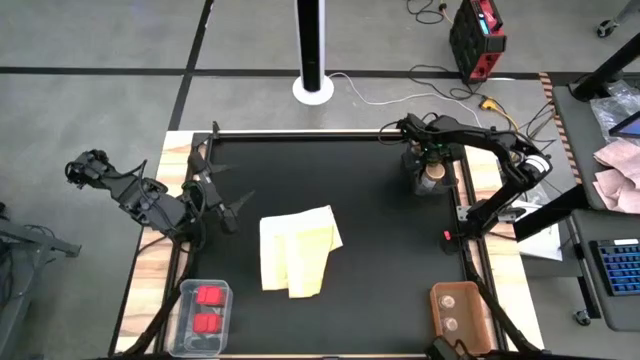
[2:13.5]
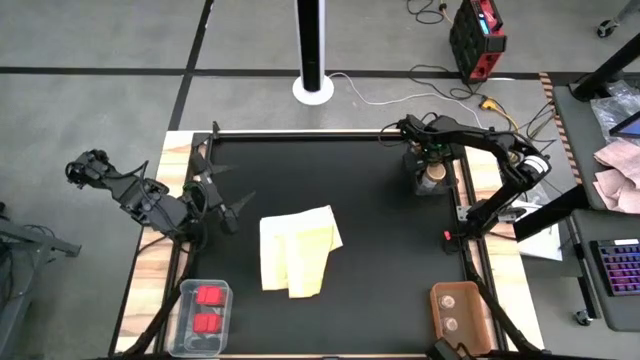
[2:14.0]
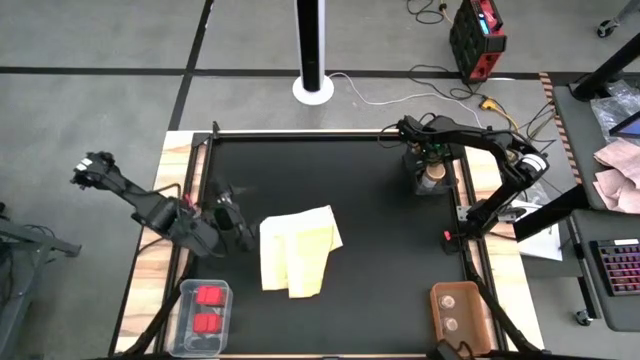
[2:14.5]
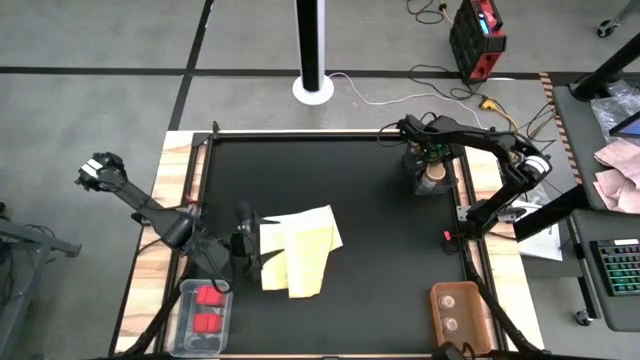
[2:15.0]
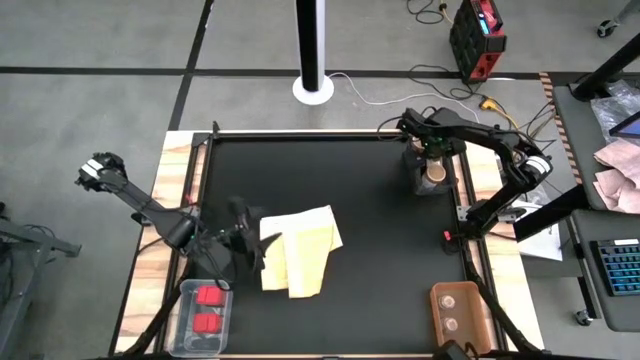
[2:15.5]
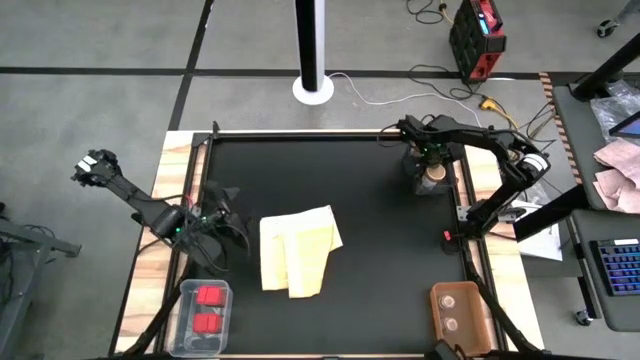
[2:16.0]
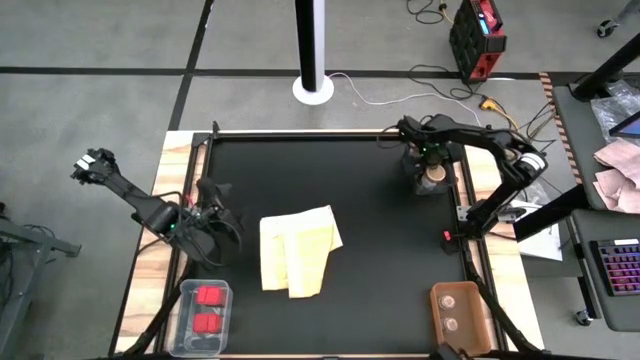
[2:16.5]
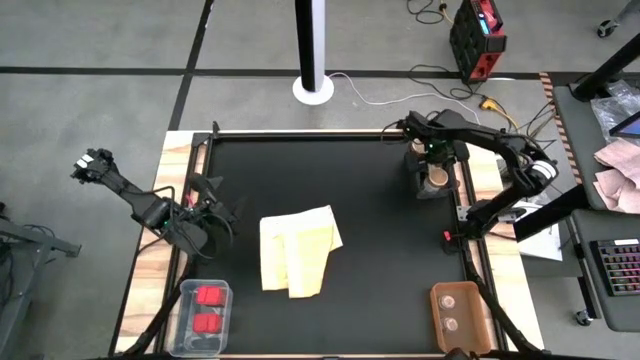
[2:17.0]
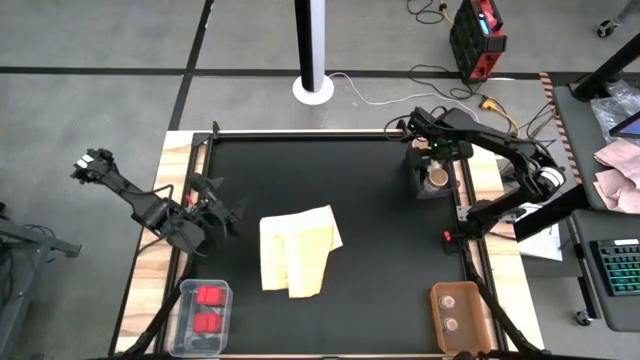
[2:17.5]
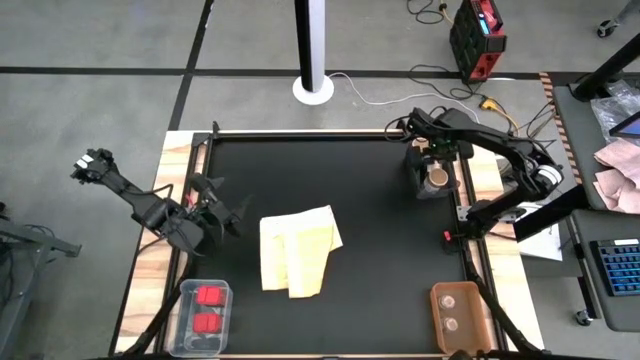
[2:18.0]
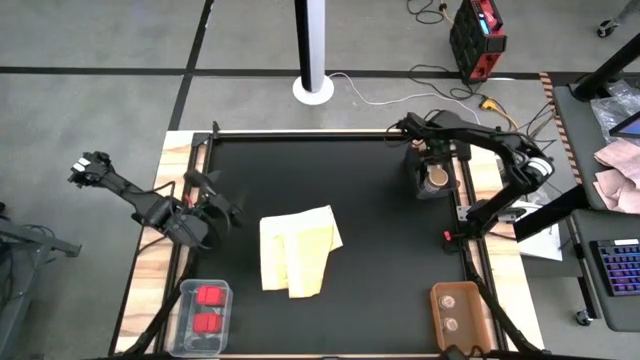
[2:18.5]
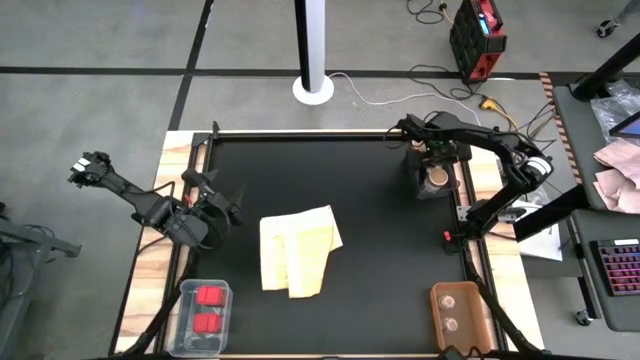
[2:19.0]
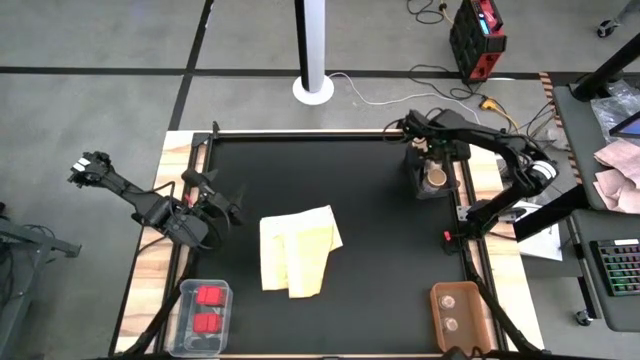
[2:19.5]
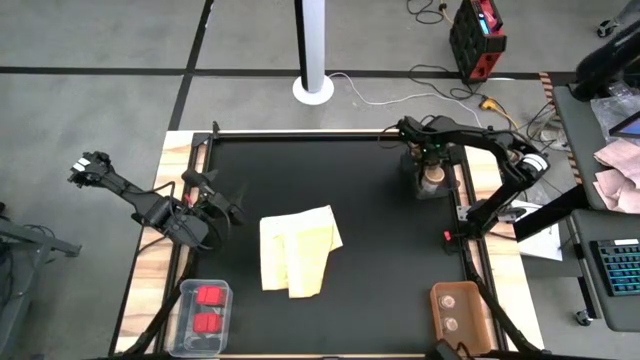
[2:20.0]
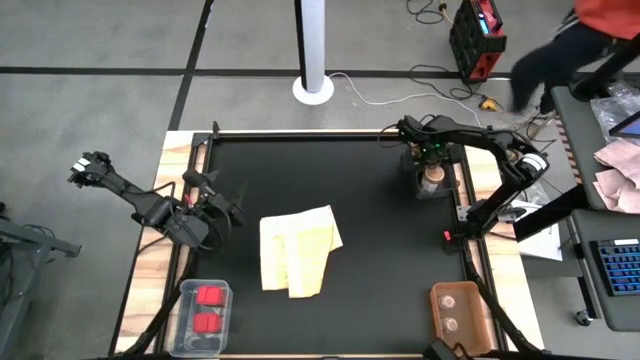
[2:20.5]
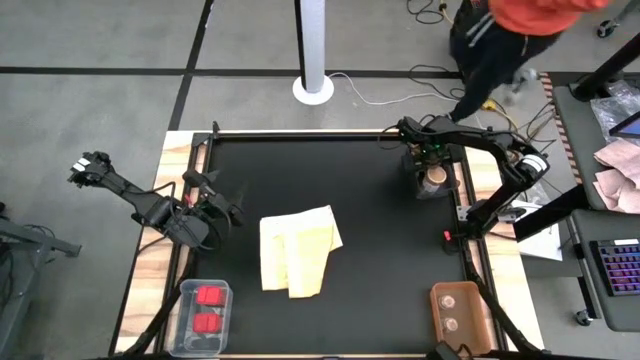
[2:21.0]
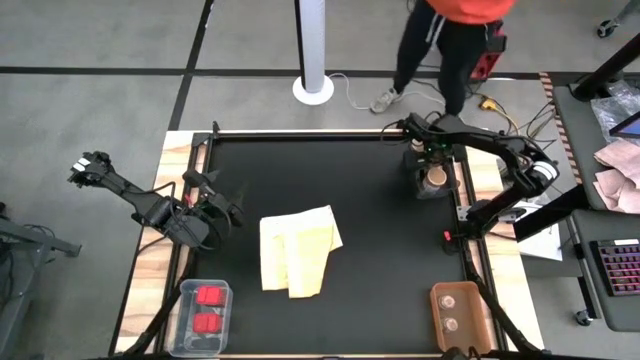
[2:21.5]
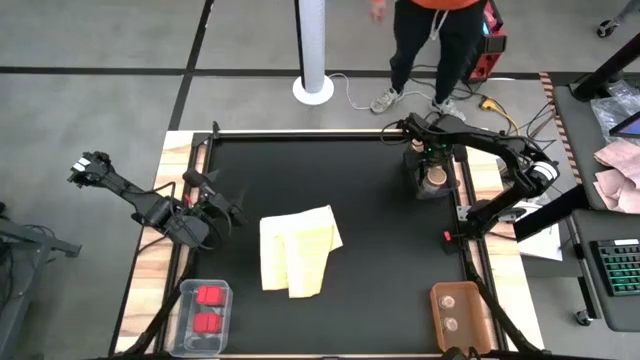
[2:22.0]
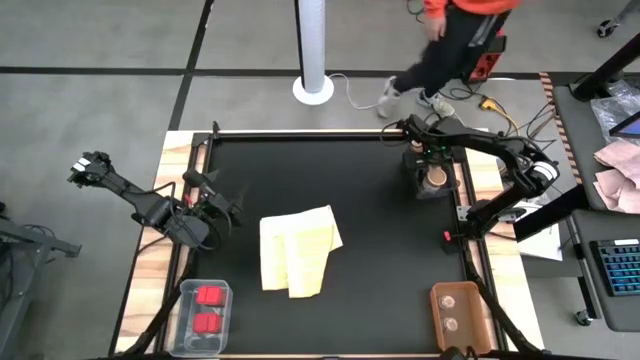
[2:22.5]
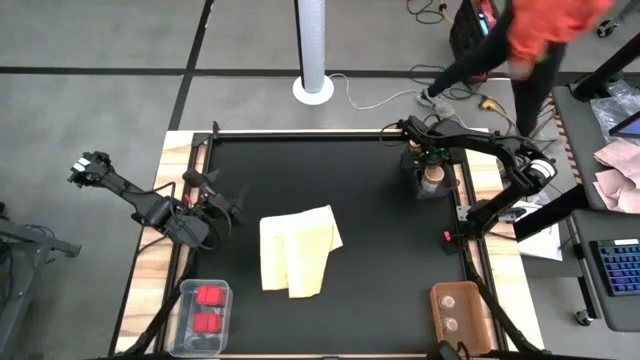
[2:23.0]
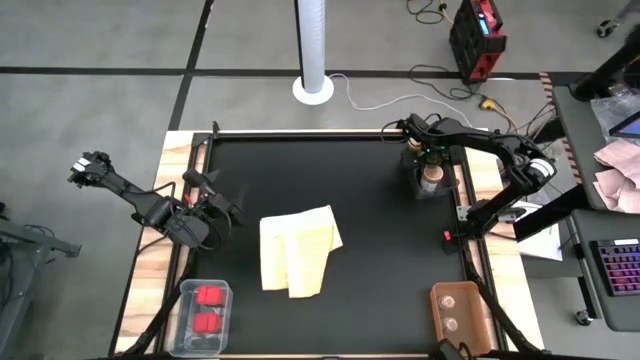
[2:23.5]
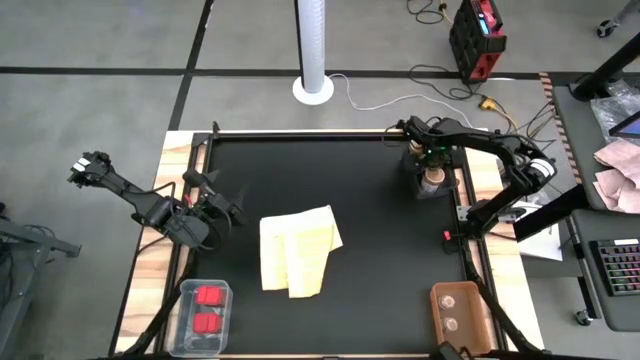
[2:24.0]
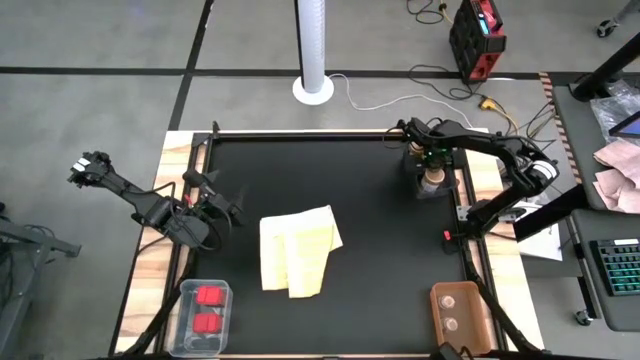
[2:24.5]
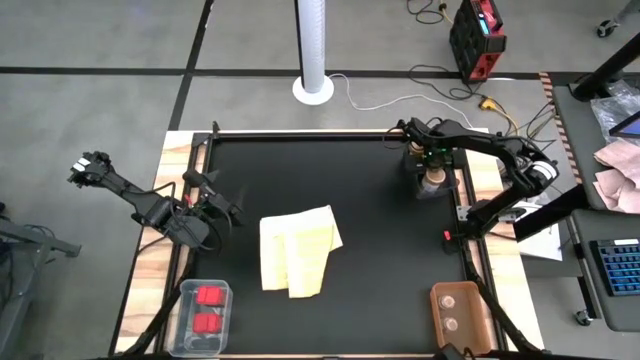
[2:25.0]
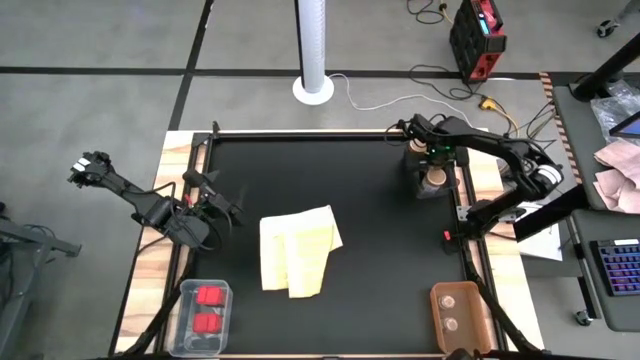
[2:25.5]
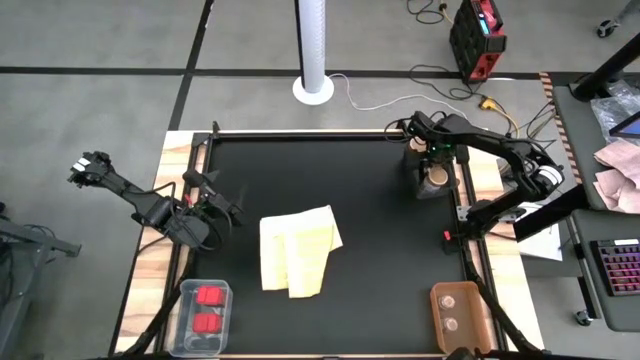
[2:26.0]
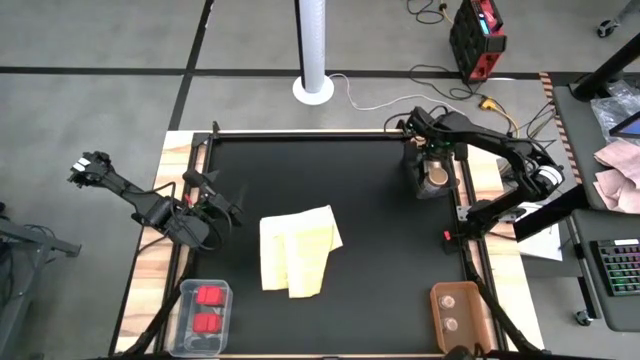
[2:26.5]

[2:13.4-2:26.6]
Task: Sort spices by type
Adjust the golden spice bottles in the black bin

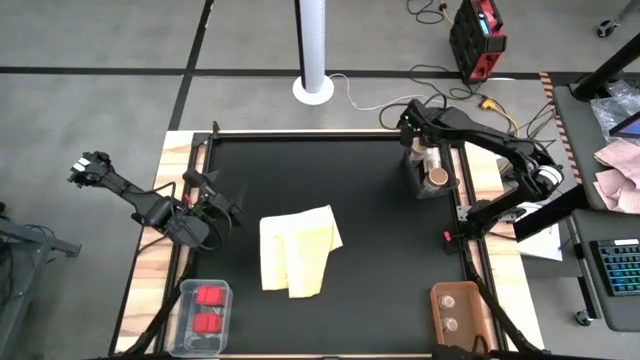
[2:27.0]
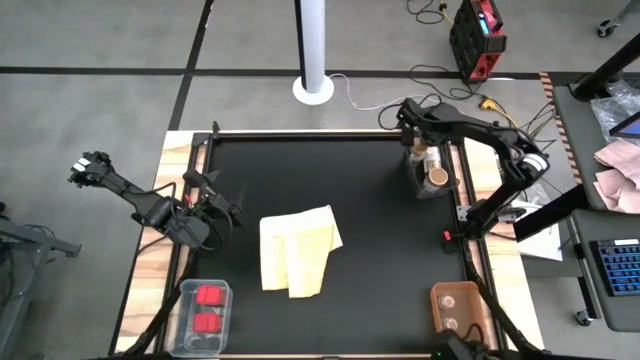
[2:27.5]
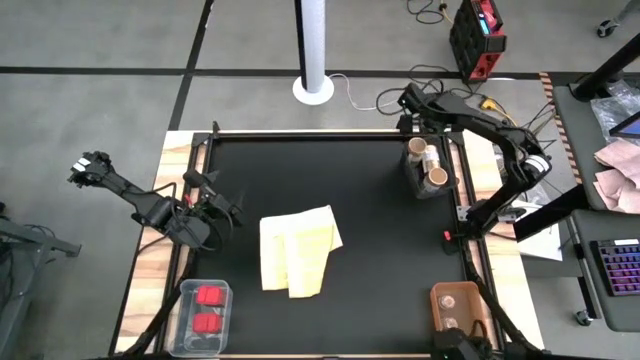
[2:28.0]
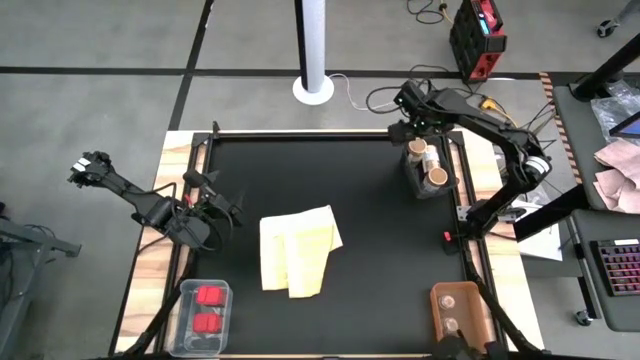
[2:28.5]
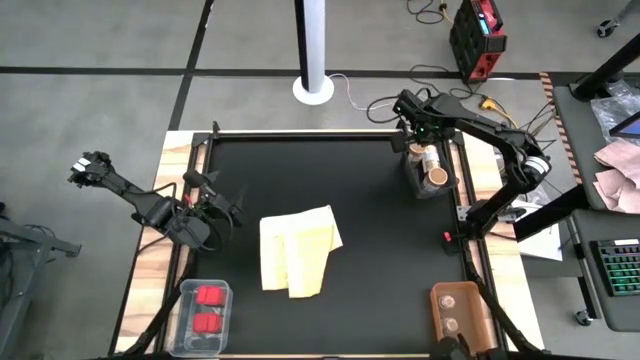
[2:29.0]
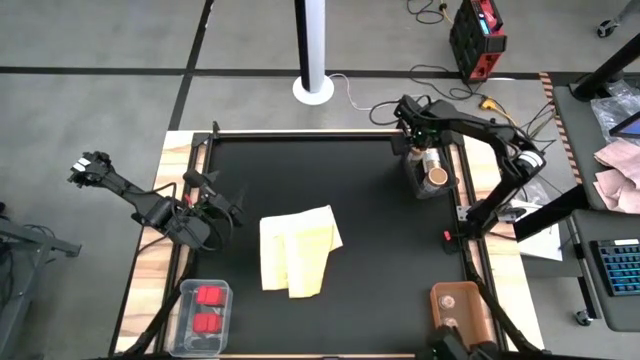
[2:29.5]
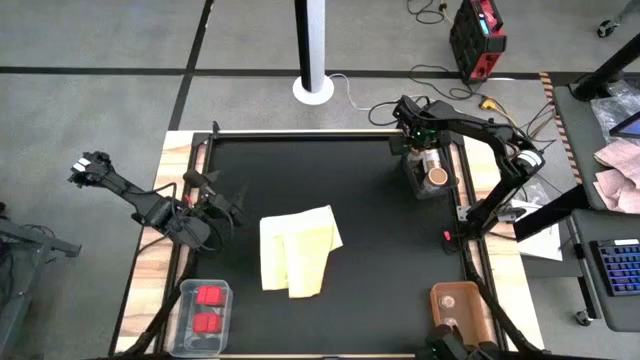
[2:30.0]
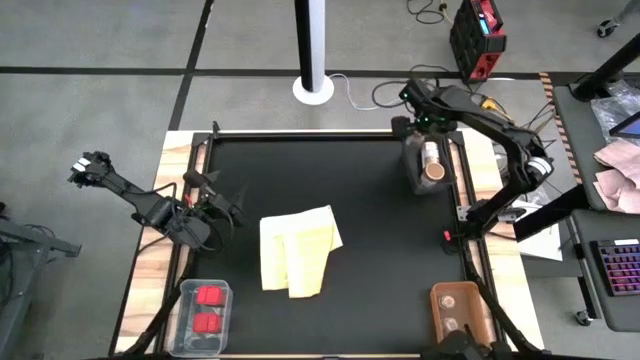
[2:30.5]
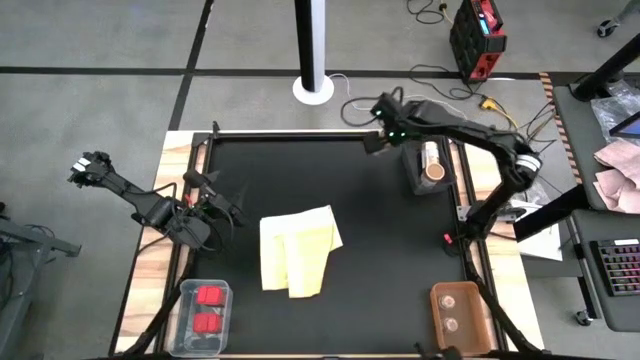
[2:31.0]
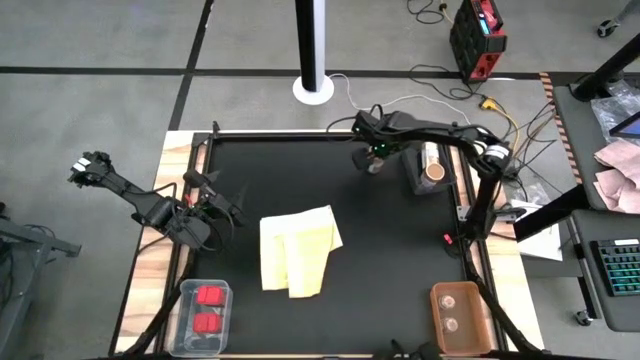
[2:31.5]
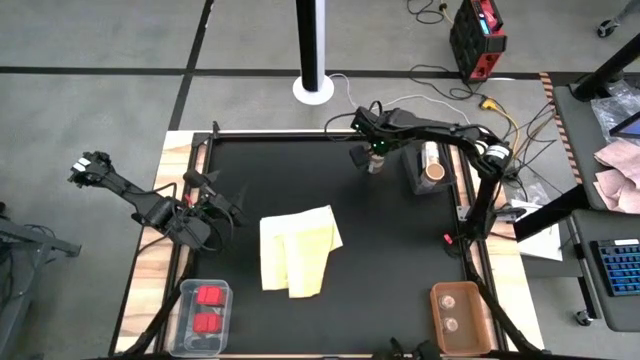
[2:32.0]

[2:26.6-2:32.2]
Remove the top left golden spice bottle from the black bin

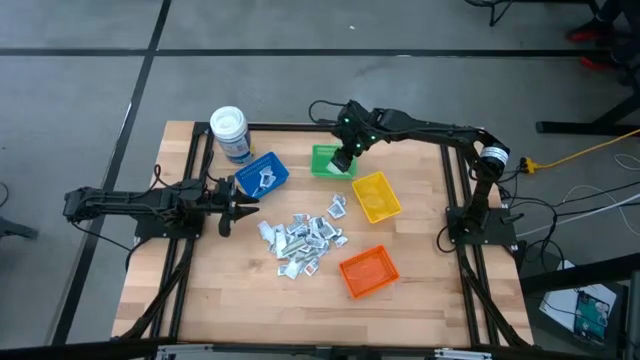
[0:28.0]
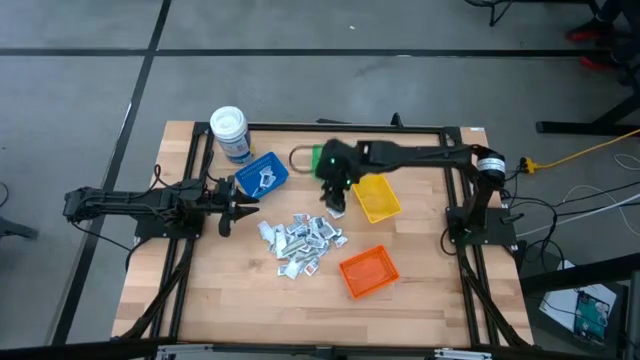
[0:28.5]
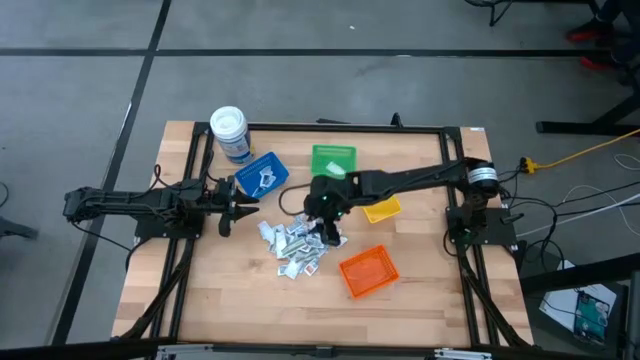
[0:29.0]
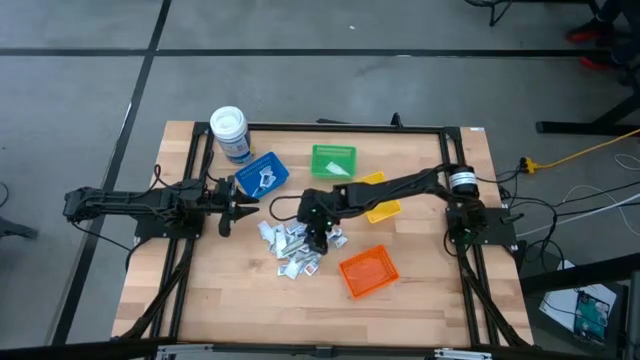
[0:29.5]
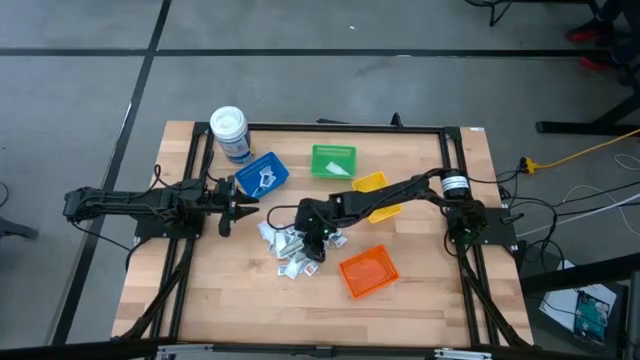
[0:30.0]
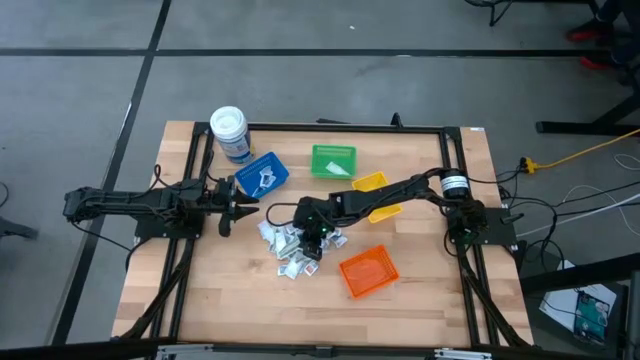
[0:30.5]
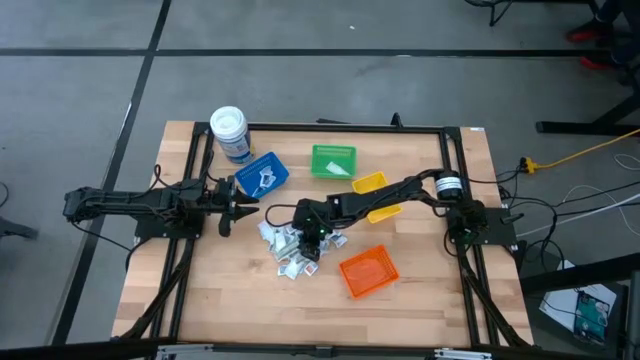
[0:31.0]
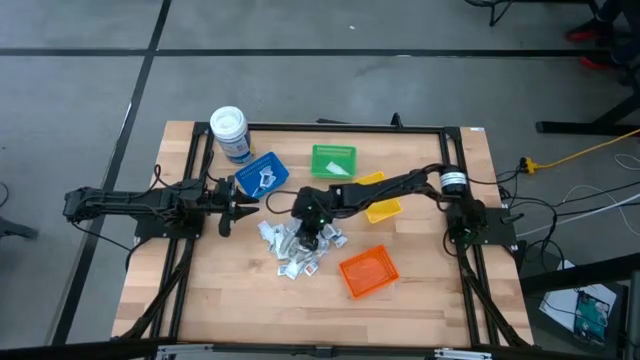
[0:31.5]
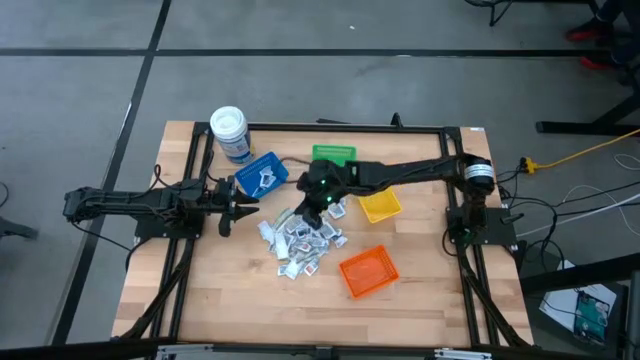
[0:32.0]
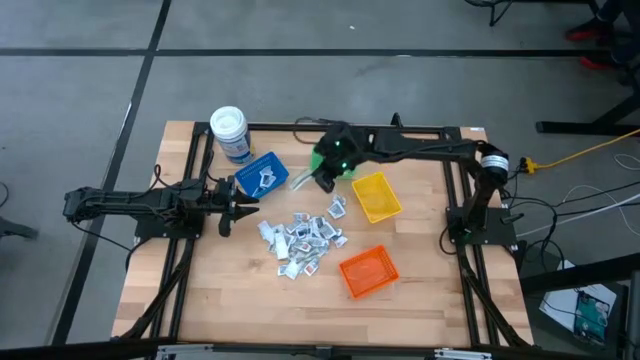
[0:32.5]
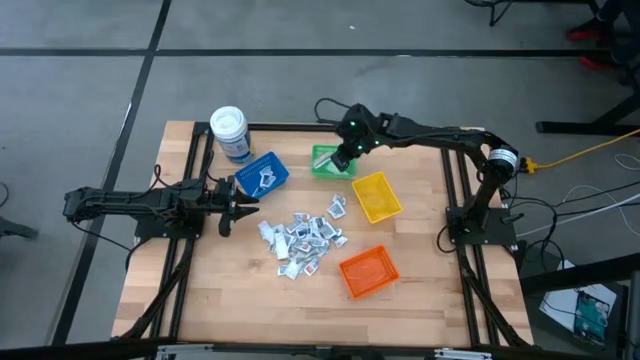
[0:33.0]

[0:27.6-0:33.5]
Task: Pick & Place First Aid Supplies
Put the white bandage into the green bin
